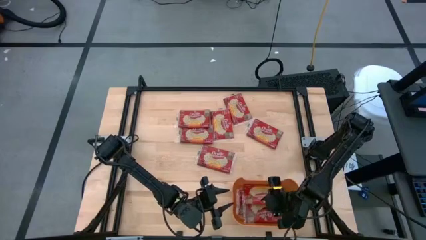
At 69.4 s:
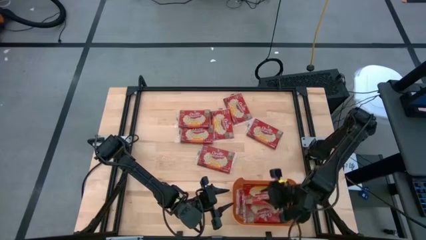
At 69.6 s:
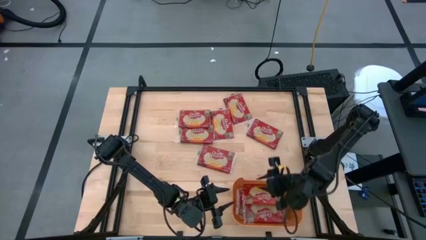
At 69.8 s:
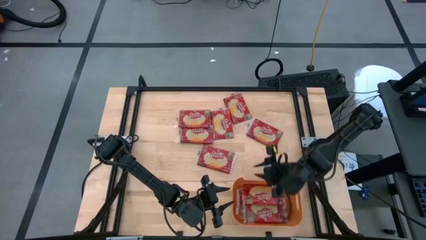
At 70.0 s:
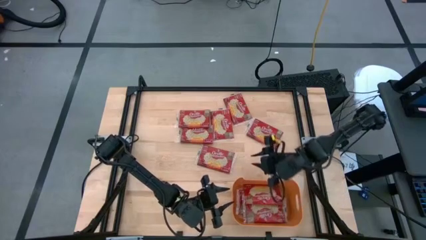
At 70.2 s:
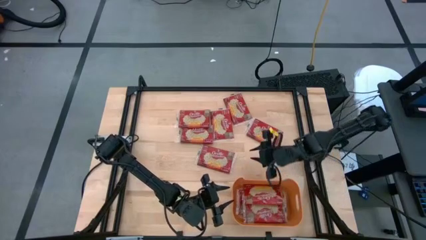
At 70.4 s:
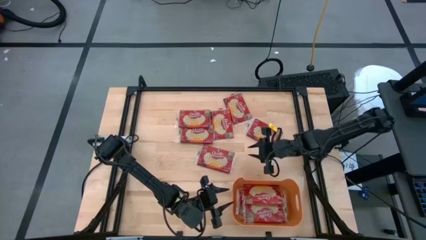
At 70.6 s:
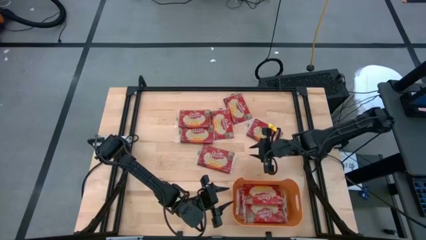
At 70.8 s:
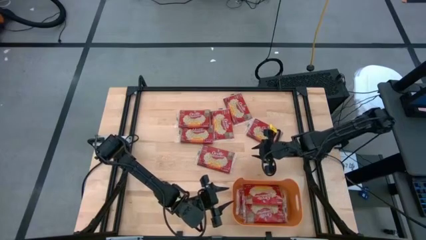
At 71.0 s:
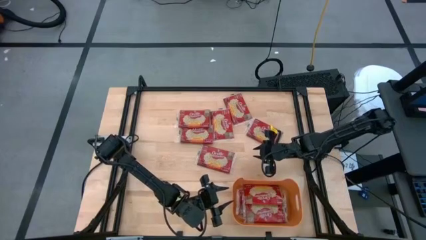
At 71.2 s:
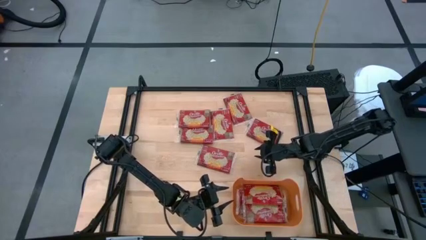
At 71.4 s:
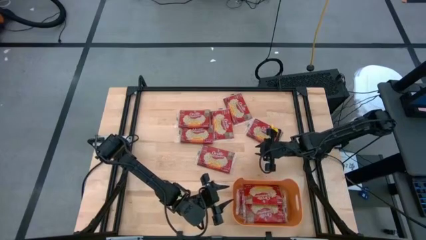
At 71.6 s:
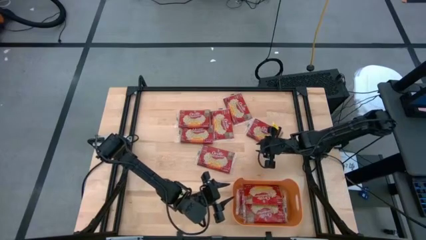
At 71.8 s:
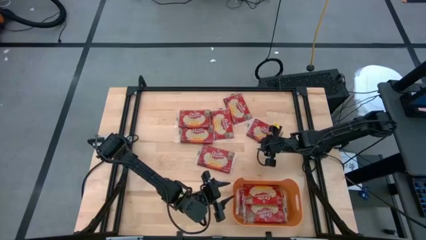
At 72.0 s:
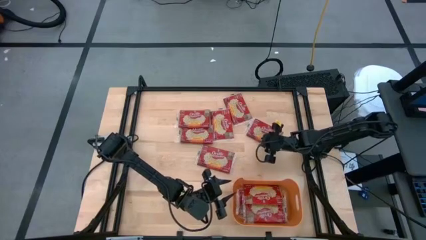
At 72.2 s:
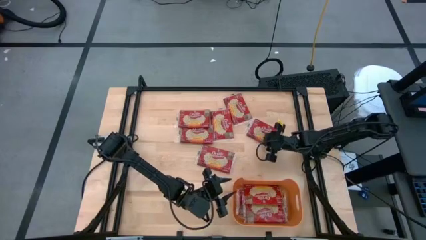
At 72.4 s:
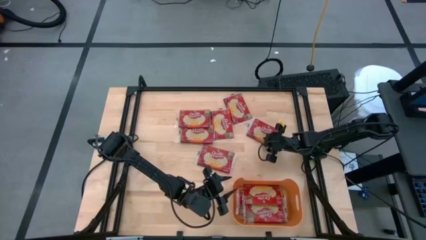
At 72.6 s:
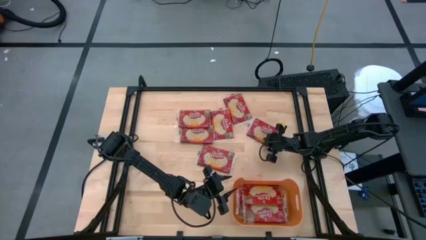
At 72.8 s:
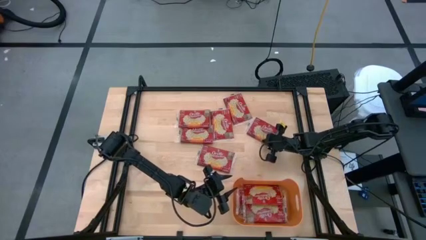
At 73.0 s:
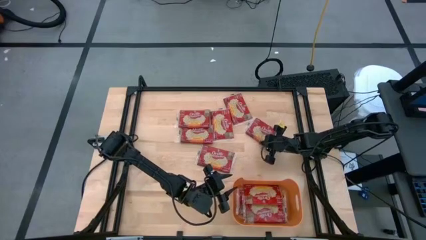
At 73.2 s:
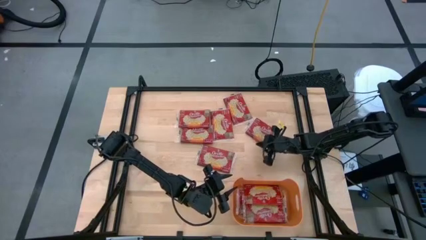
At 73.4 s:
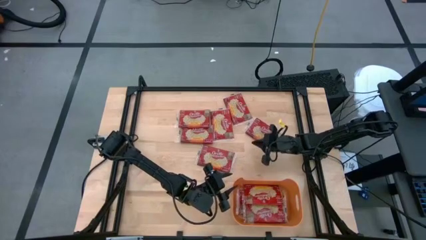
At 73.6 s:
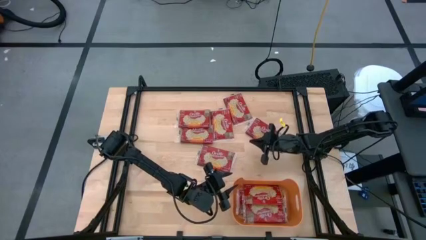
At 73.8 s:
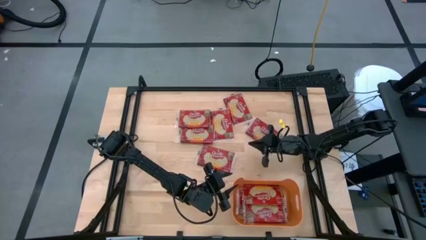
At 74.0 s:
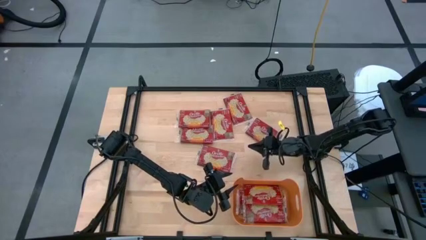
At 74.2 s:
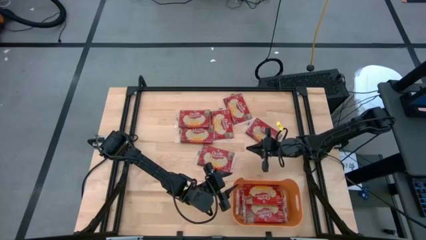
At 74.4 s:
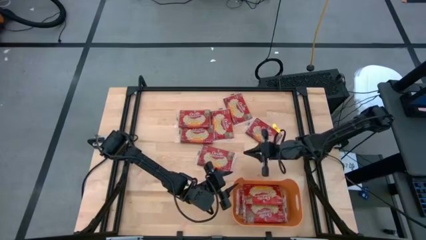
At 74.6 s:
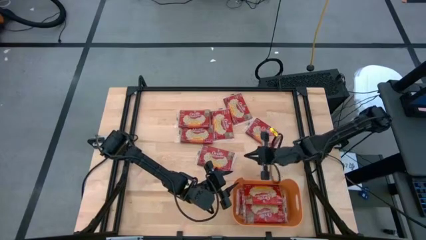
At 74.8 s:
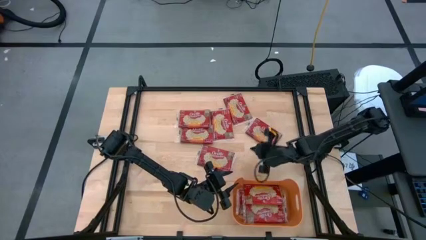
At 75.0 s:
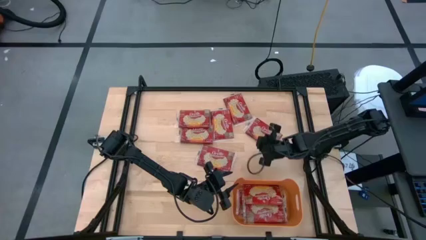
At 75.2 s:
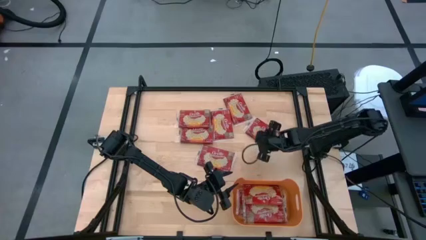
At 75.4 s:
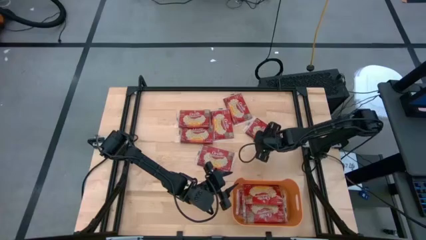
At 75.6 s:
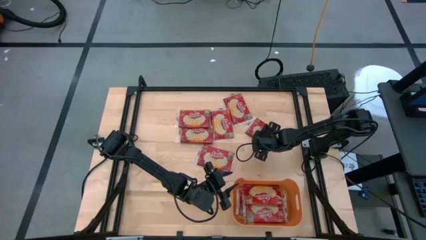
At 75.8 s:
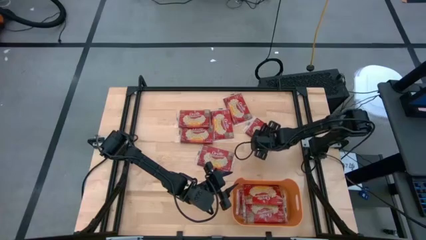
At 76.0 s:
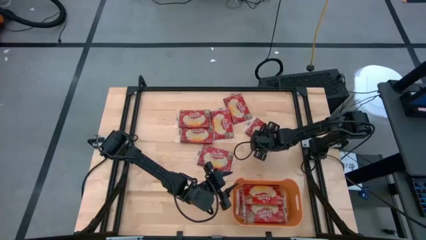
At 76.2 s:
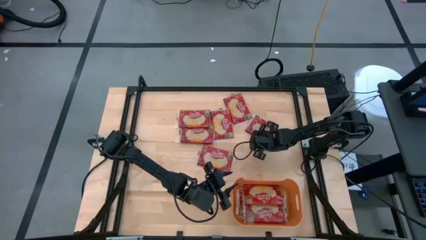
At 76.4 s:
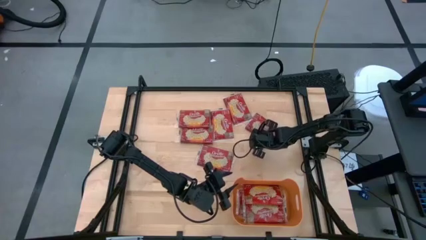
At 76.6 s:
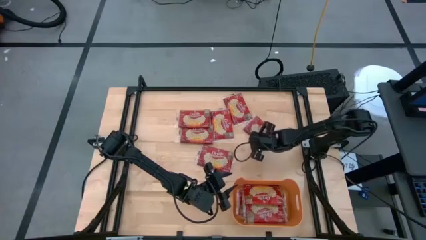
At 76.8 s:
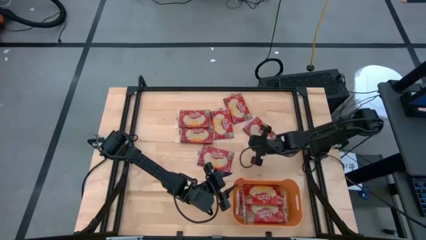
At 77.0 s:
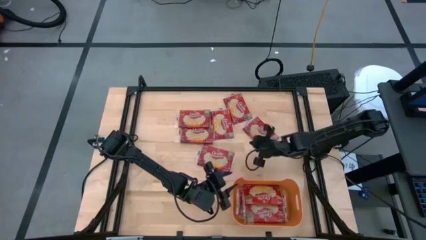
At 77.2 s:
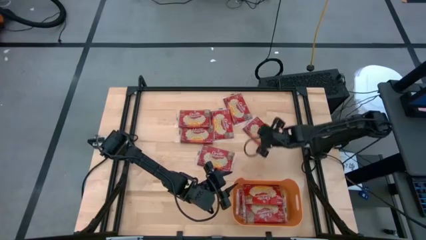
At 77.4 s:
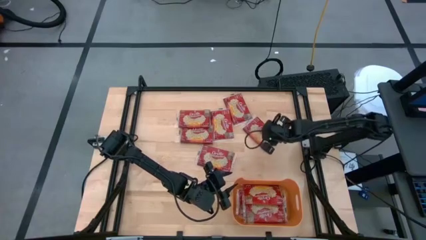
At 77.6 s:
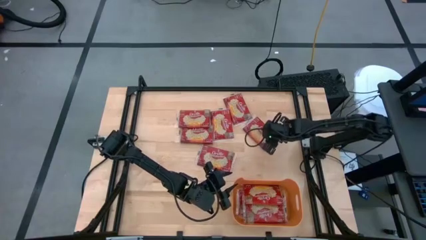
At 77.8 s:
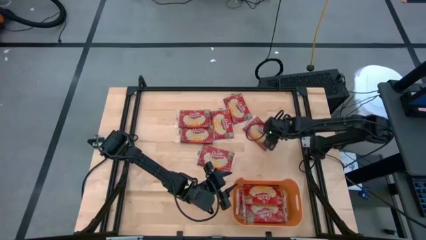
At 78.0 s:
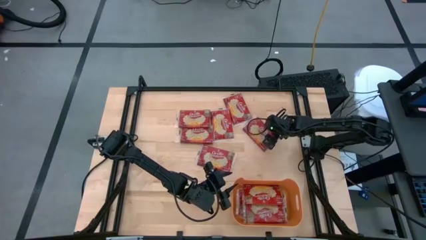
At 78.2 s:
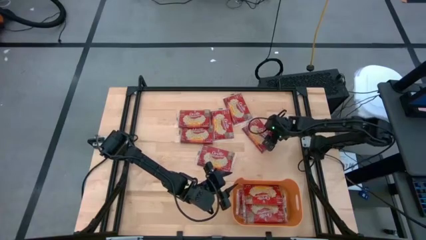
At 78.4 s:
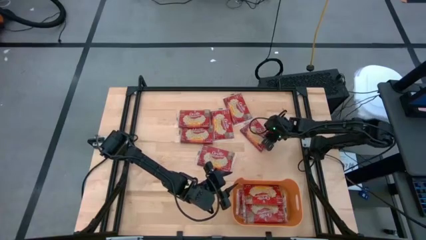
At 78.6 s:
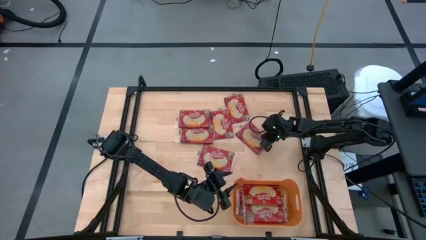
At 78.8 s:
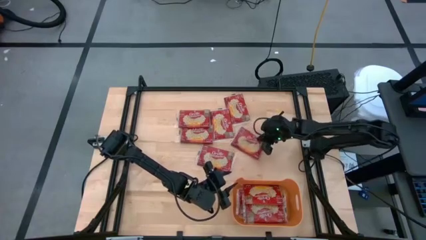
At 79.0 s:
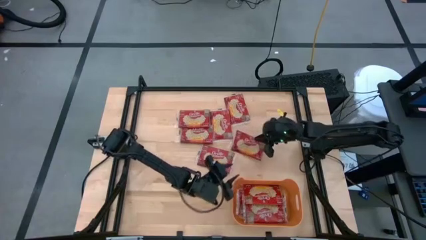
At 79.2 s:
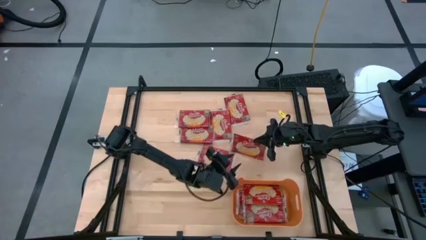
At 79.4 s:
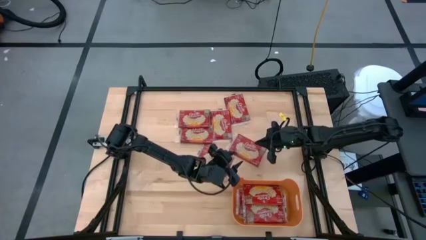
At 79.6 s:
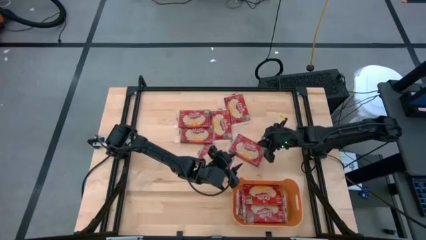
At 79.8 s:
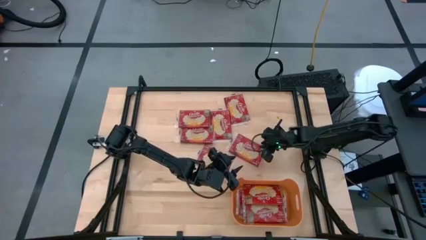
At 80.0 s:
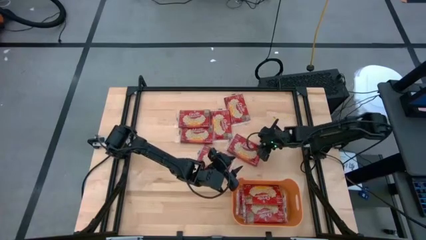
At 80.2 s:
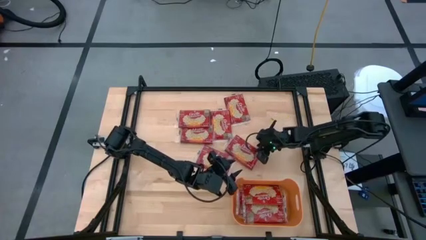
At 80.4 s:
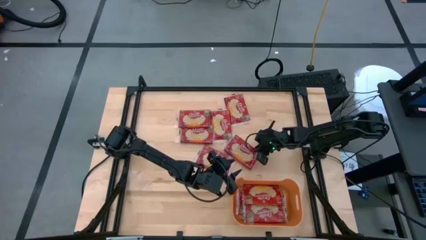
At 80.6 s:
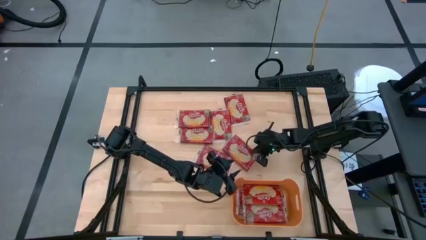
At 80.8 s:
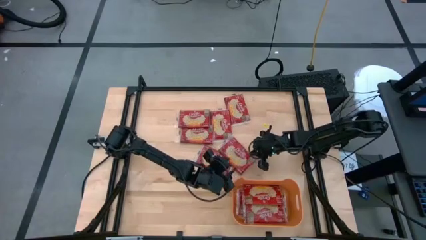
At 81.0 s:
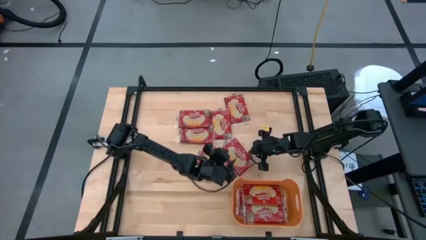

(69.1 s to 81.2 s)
Task: Sort popcorn bags into baskets
Put the red popcorn bag into the orange bin
